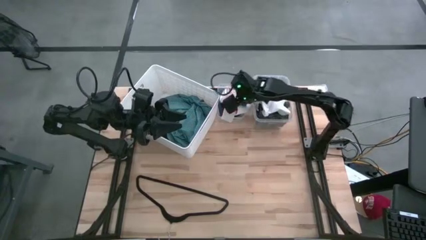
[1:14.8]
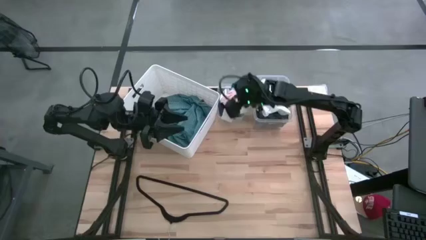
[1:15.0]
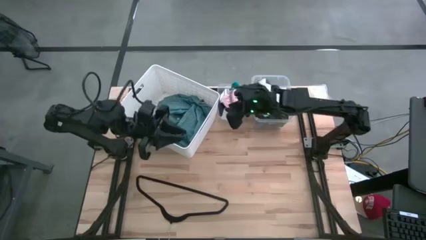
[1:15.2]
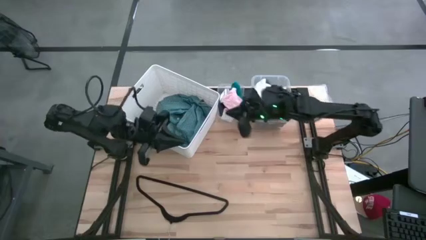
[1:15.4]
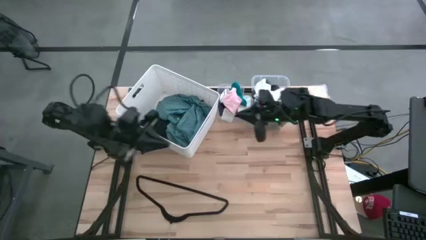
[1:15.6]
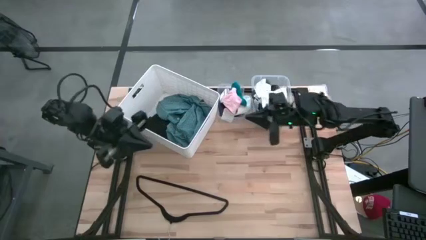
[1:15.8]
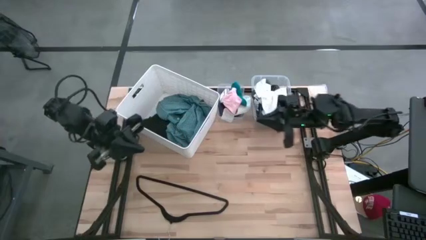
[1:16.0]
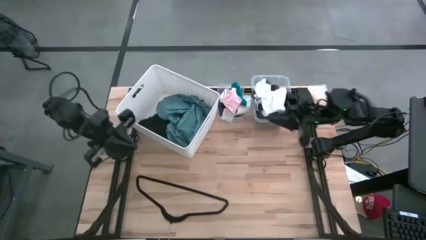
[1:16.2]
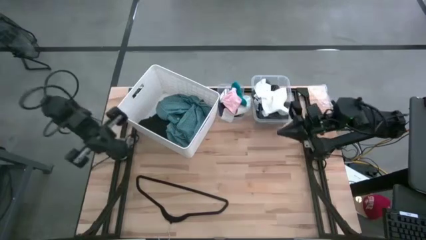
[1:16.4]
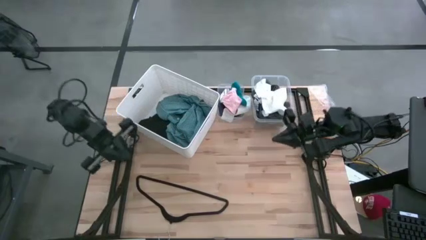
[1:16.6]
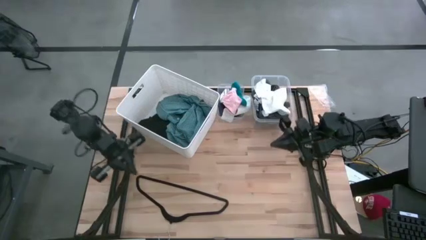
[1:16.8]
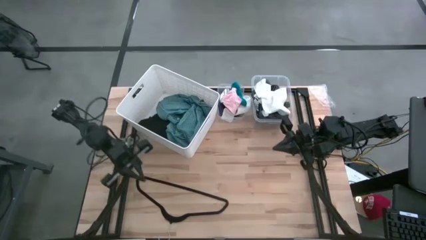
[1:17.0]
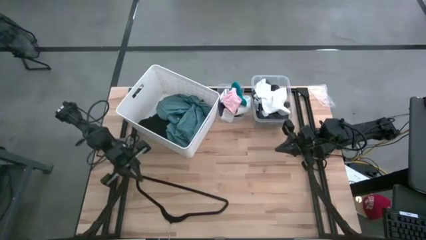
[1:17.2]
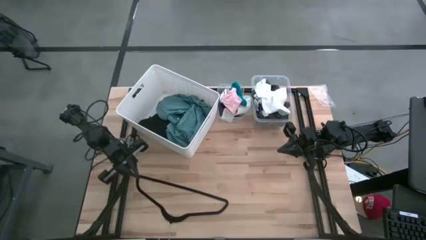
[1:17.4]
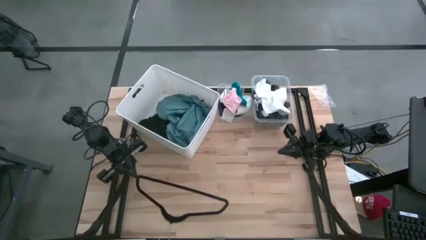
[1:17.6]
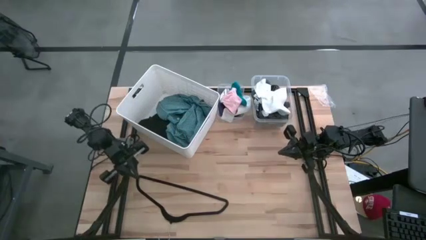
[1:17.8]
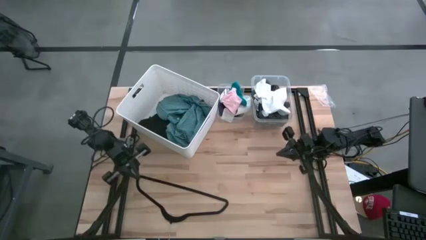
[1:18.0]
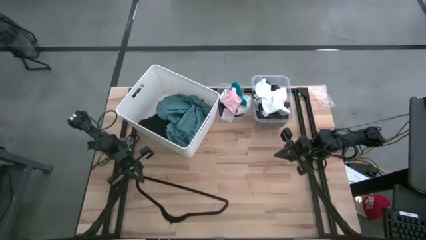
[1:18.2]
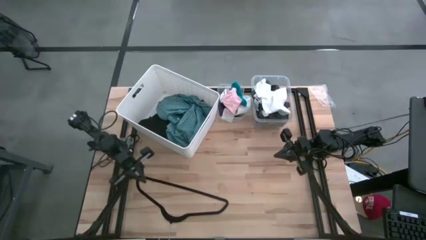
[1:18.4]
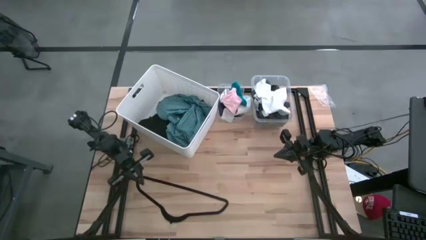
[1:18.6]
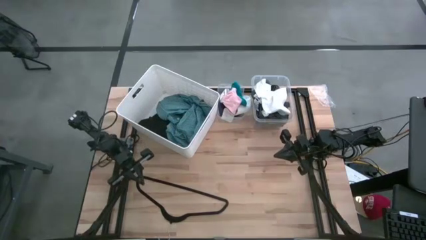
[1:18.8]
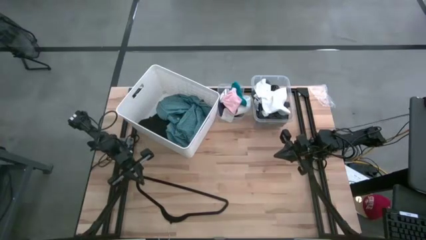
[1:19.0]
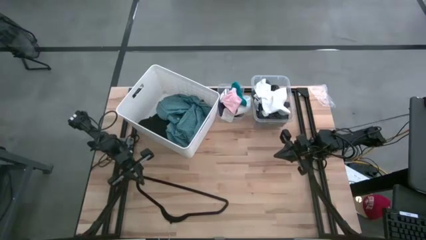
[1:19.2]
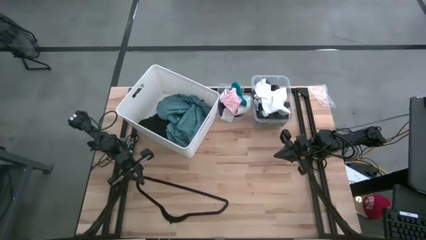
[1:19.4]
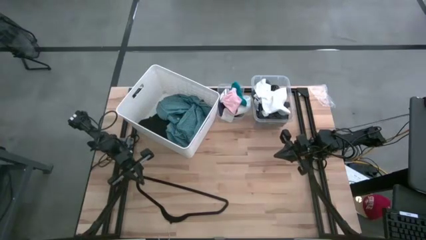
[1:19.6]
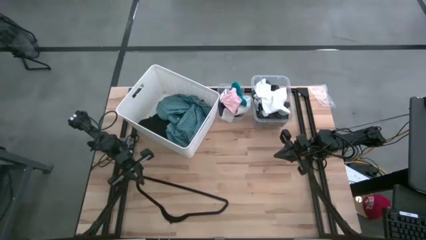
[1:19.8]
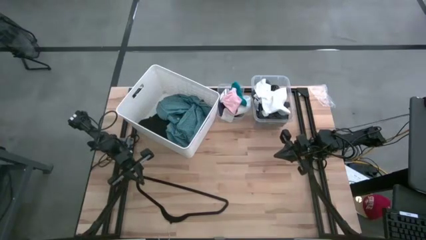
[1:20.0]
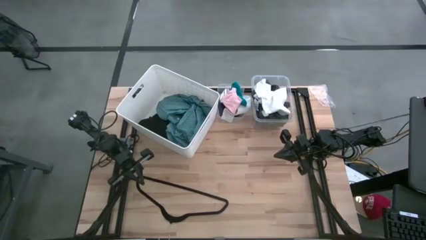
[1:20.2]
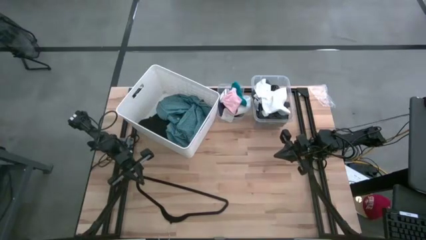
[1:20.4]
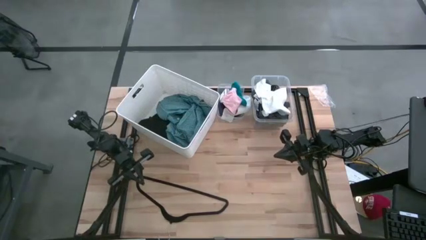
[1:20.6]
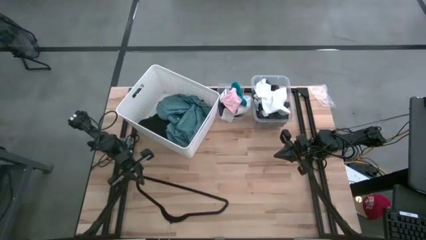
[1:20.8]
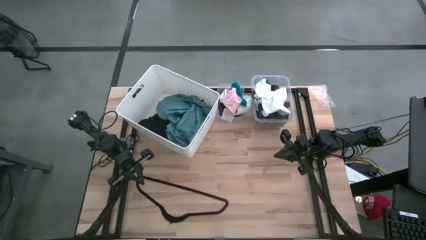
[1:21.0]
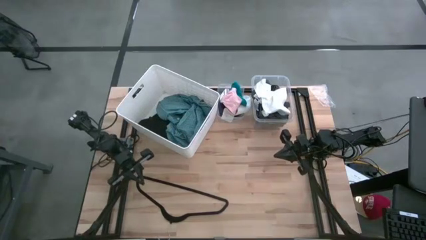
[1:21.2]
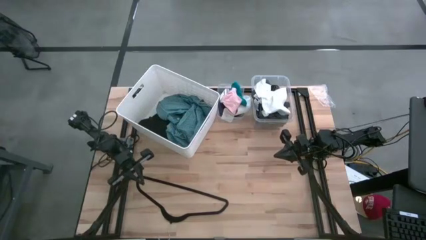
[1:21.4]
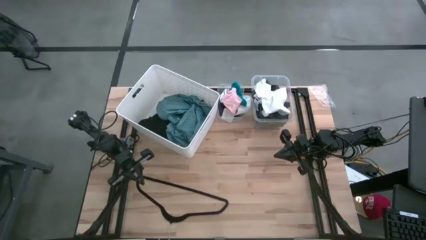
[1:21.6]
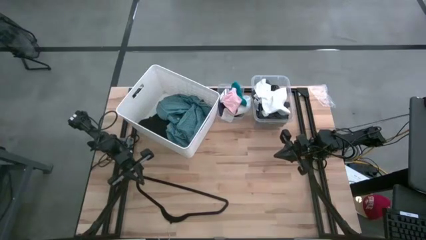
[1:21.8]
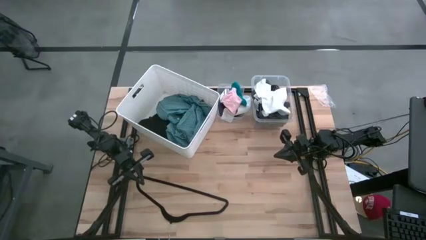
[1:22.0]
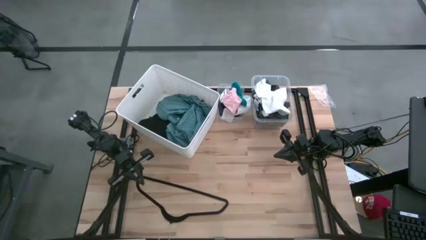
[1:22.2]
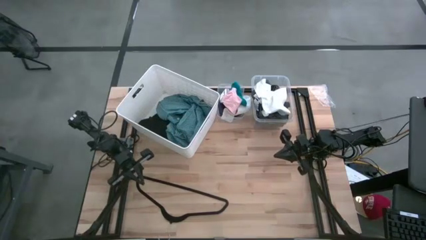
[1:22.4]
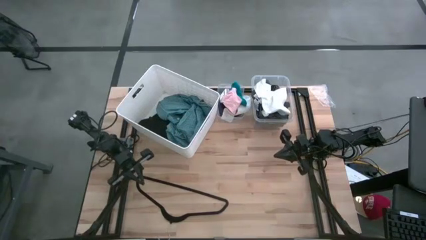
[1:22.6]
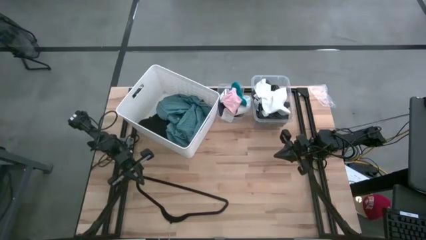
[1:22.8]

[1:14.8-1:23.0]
Task: Pick & Place Cloths
Return to Home Position

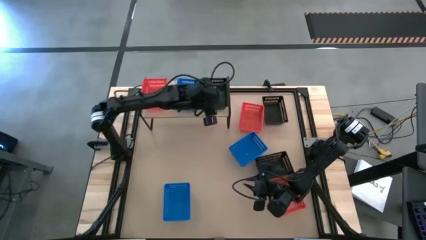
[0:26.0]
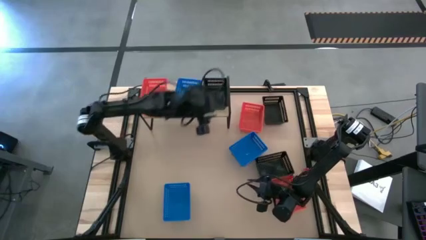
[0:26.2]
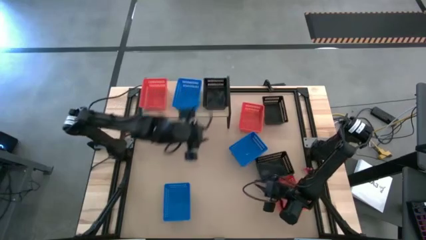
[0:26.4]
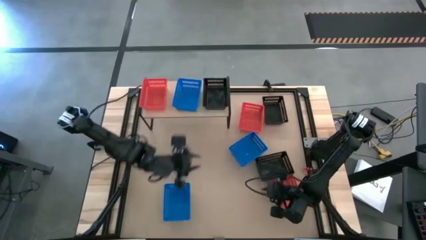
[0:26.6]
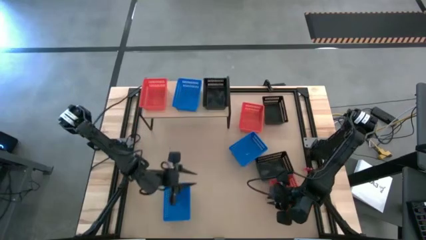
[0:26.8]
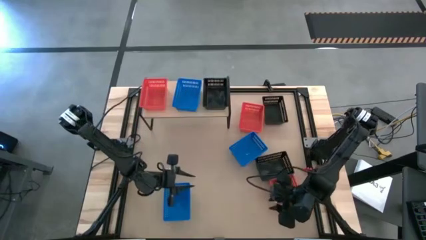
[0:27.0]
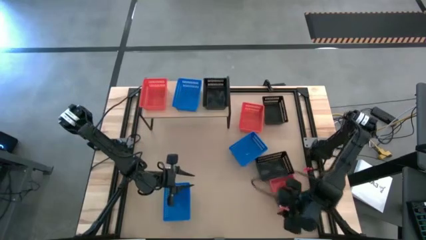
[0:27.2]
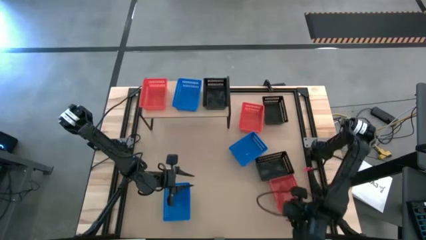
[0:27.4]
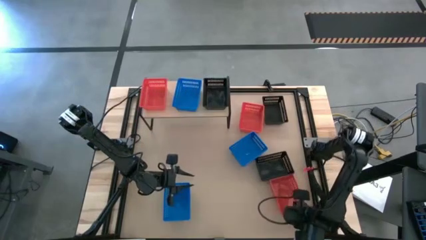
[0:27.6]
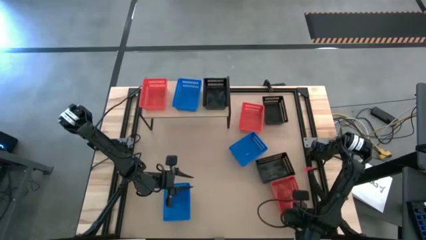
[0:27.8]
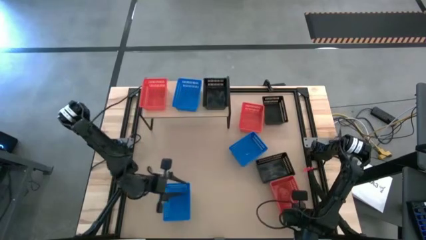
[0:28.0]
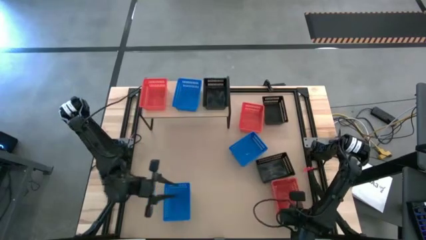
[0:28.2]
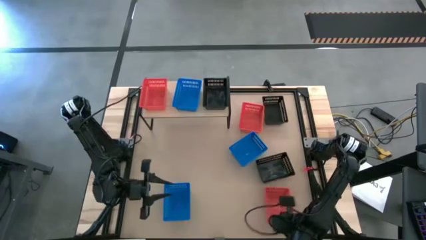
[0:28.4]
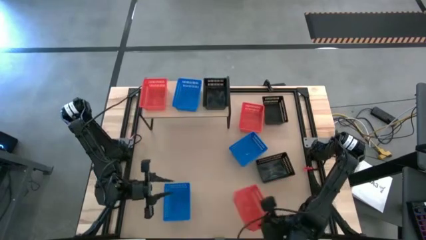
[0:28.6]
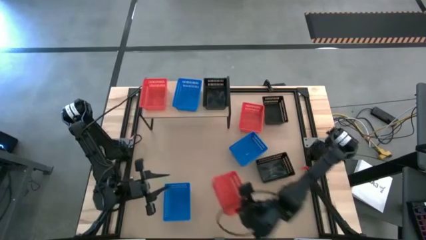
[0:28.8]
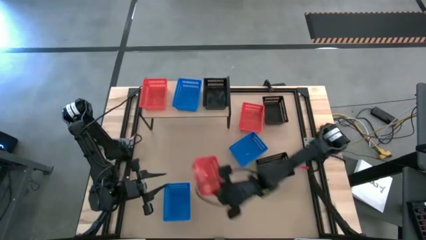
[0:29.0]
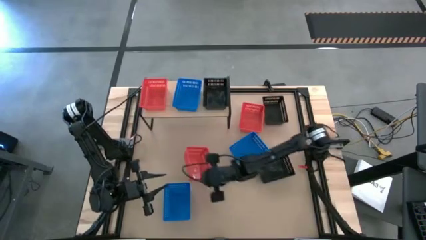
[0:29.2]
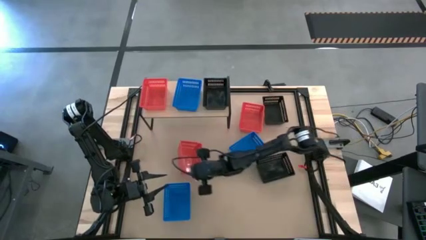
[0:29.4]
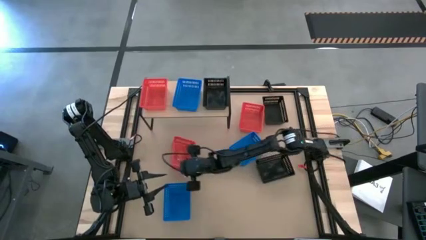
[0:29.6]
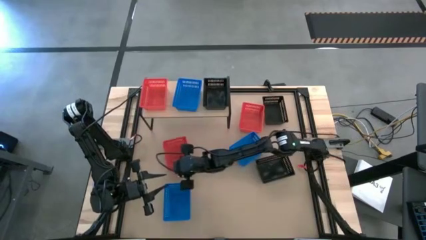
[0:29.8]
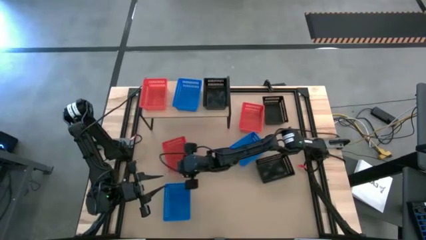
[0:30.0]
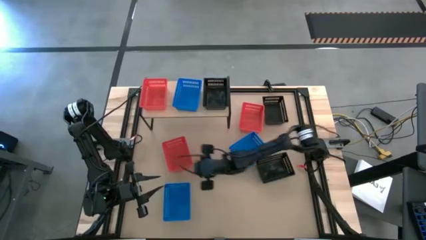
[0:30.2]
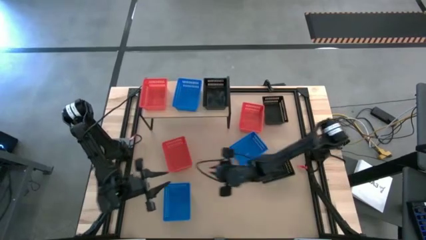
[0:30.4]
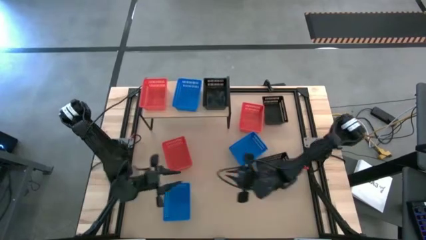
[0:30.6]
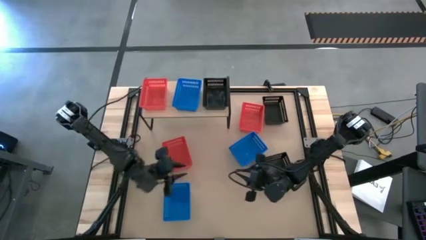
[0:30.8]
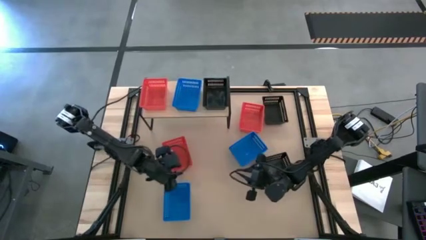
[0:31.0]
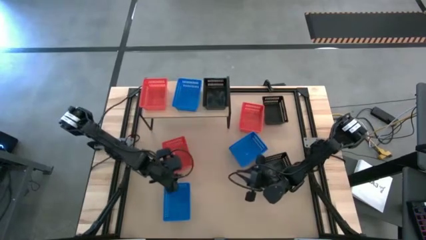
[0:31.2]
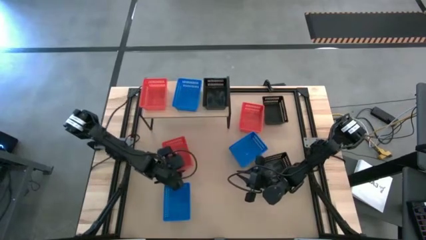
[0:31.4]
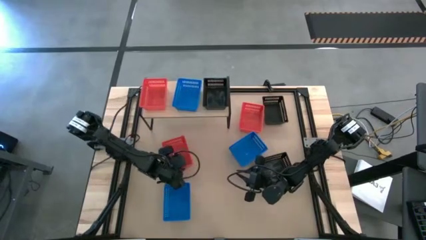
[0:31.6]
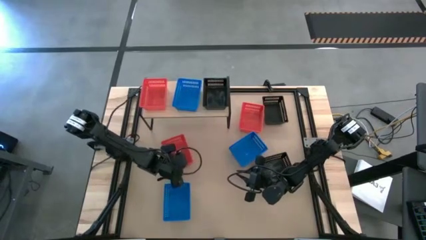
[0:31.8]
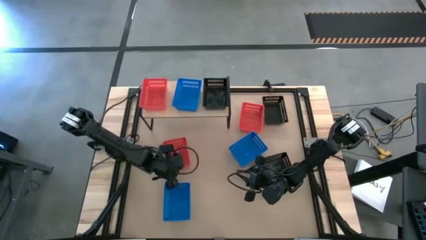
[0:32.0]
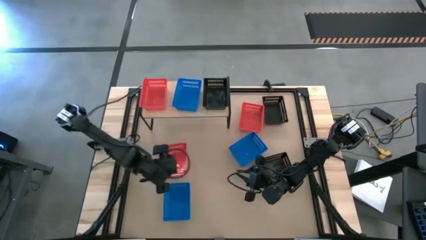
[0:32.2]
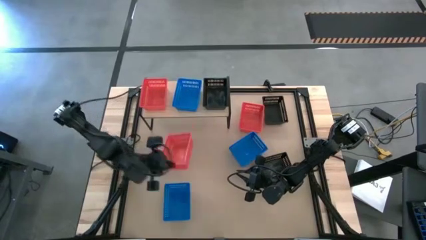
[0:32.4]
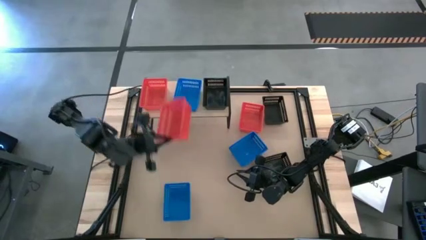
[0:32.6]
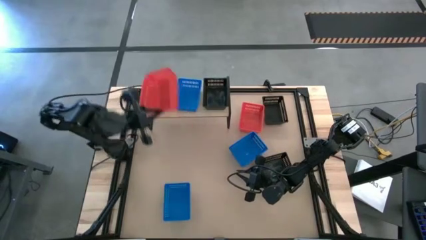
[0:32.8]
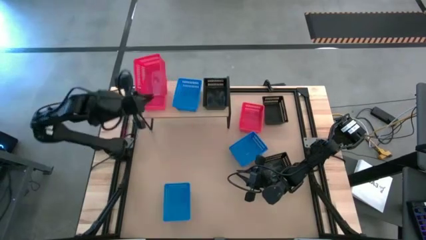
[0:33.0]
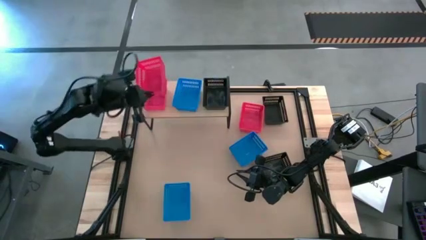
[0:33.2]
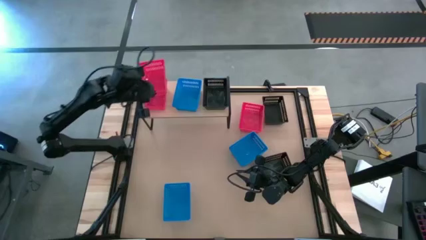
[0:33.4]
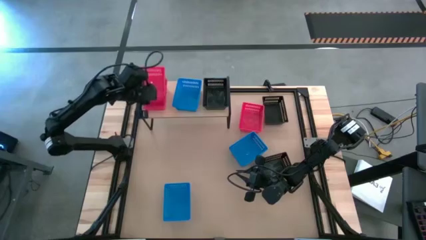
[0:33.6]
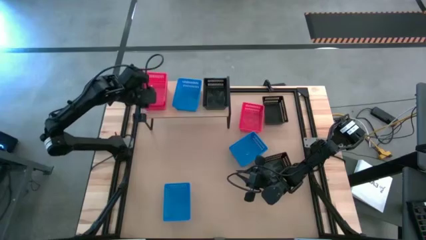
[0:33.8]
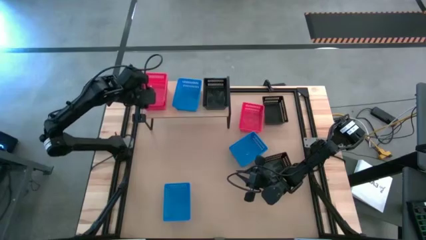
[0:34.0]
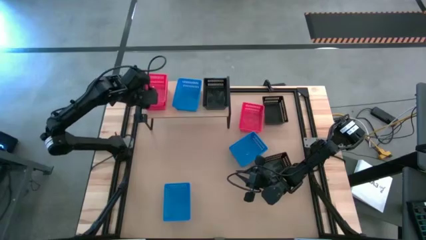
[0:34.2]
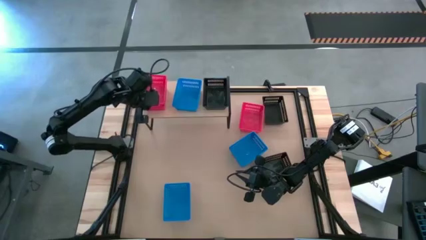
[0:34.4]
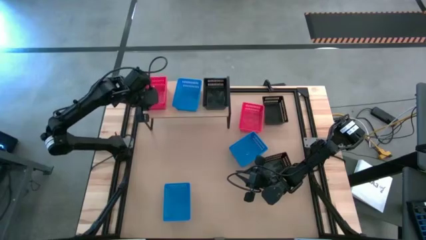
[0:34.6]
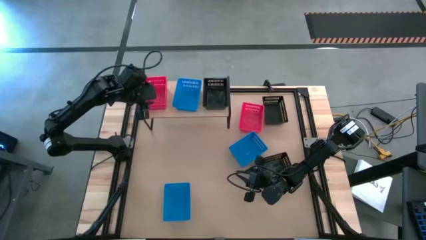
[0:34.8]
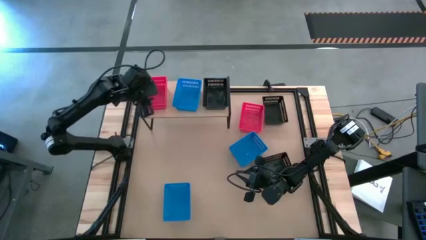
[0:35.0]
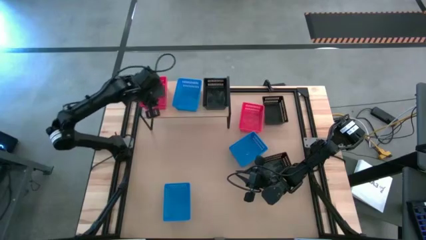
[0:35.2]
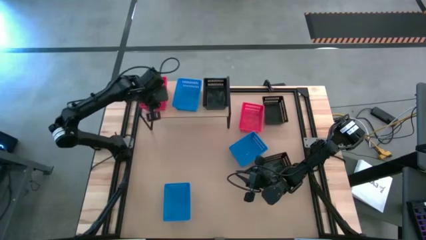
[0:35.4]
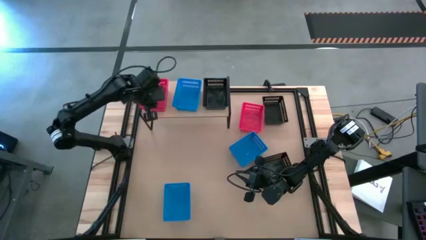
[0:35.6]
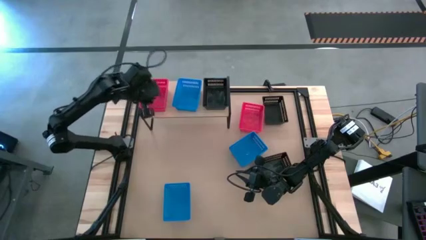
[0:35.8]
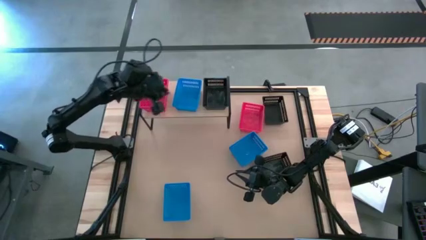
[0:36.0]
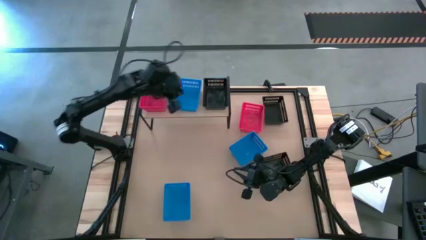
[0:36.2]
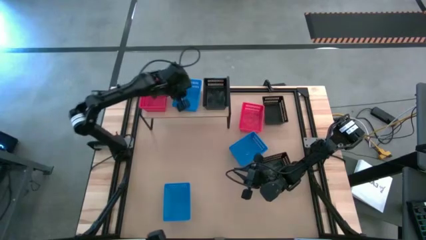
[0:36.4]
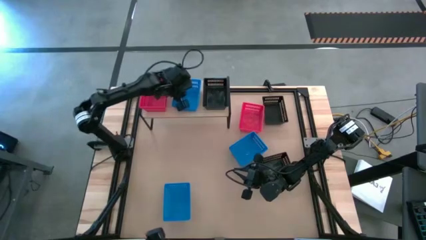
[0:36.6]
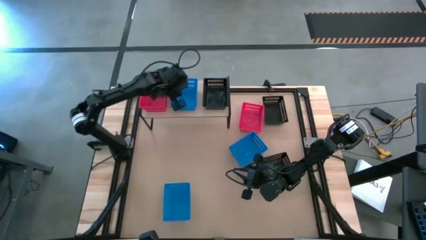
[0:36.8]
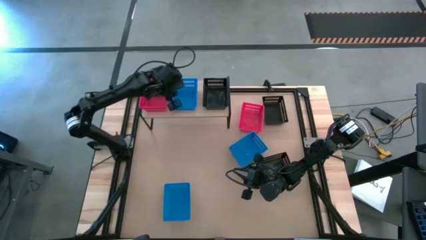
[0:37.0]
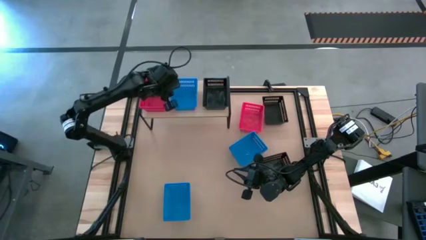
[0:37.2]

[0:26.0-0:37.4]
Task: Stack baskets on shelf by color
Stack the bottom red bin on the red bin on the shelf
